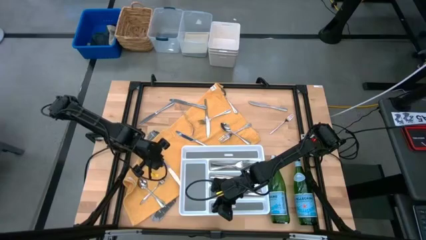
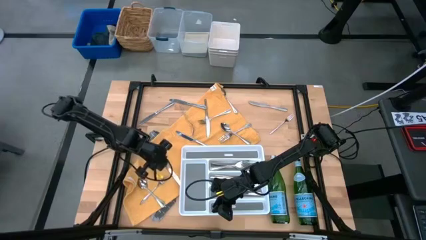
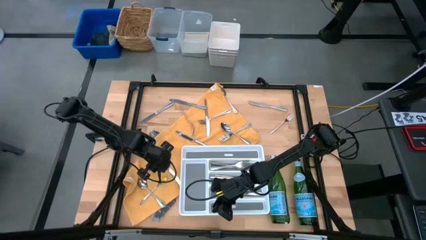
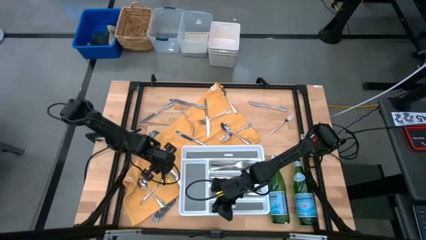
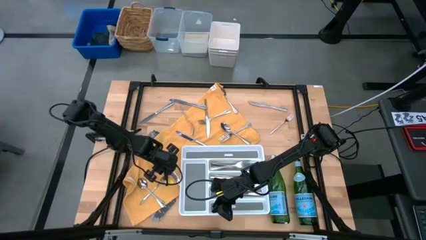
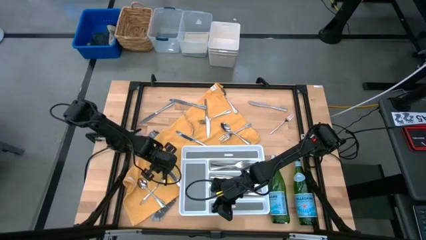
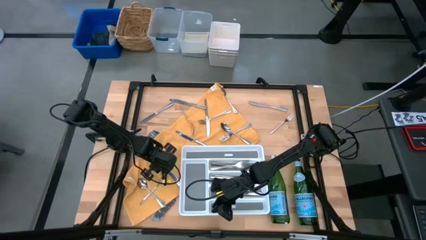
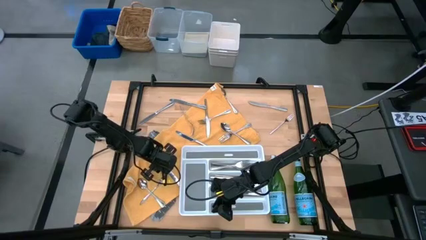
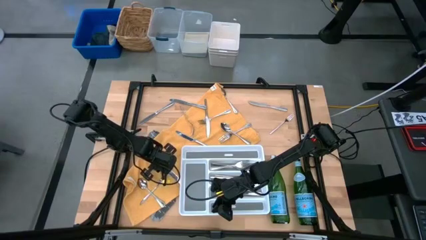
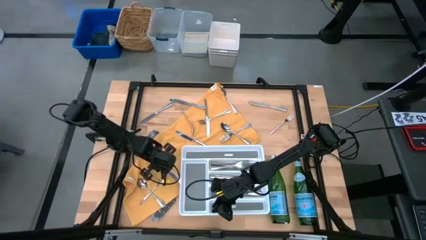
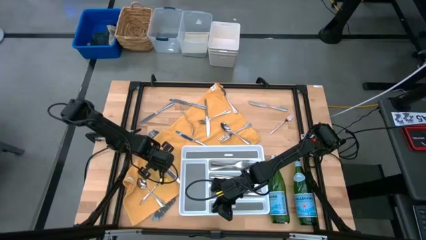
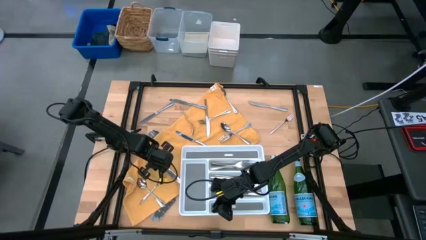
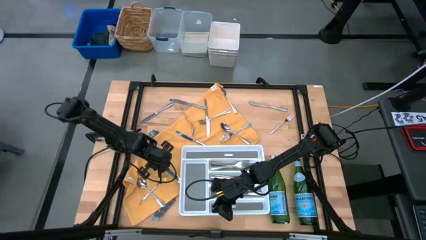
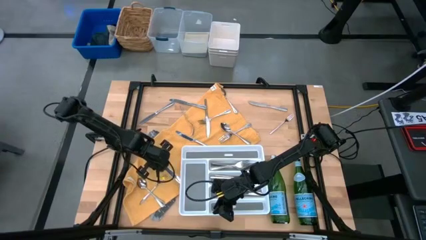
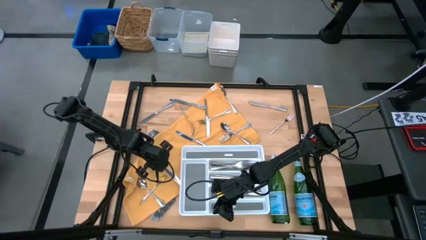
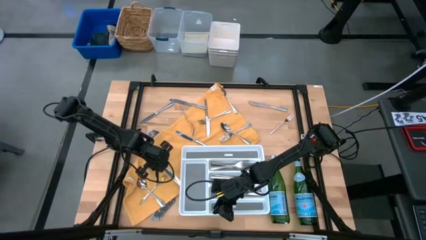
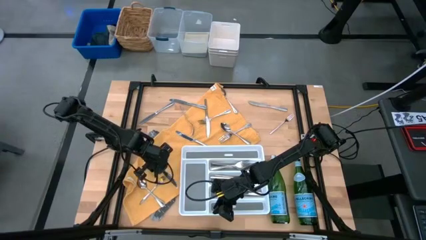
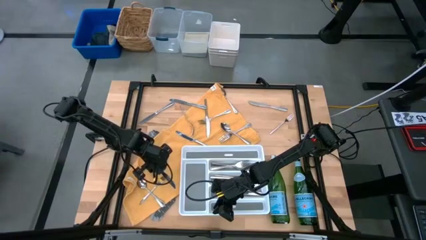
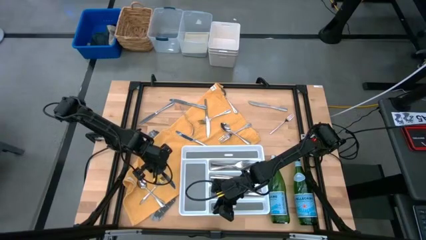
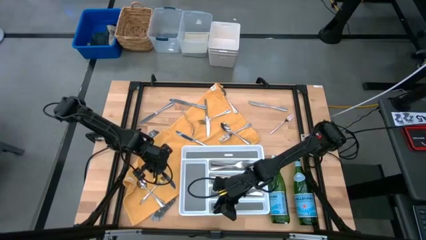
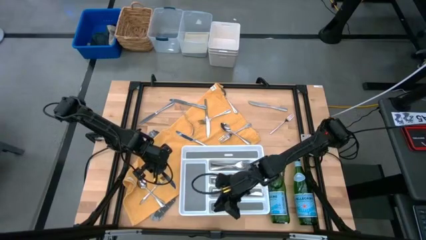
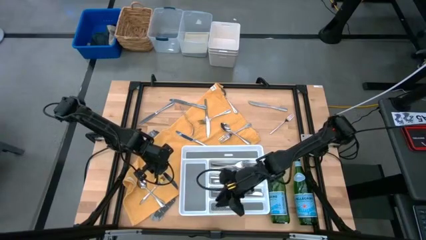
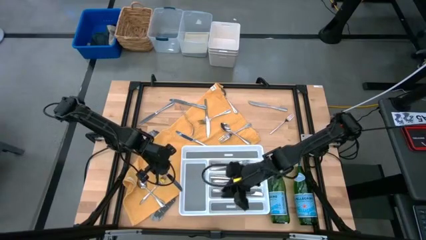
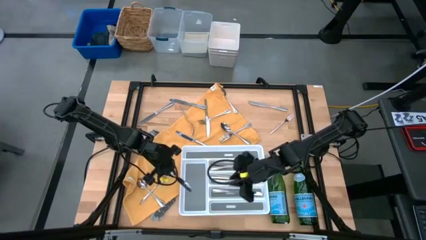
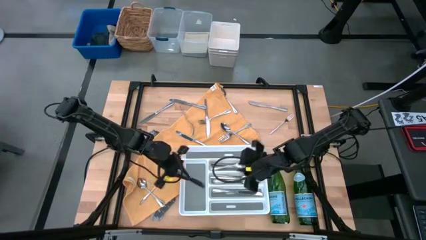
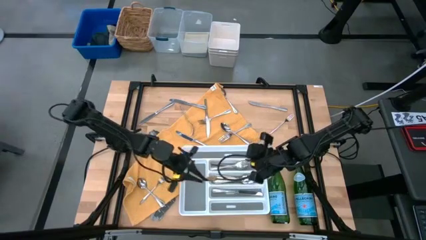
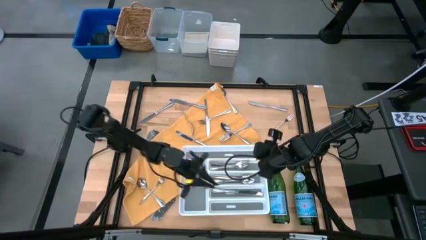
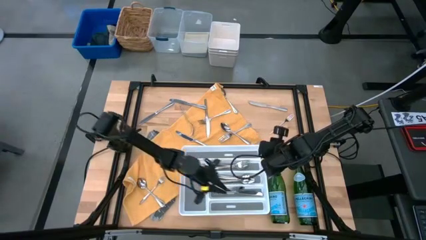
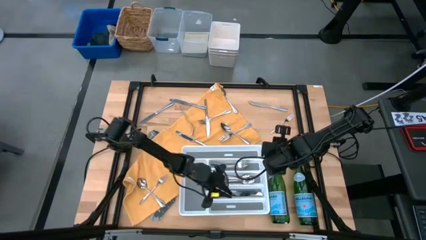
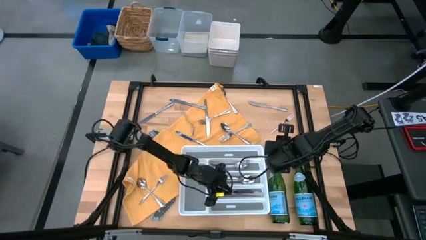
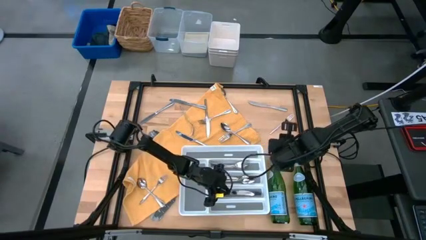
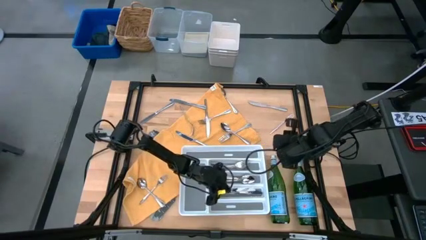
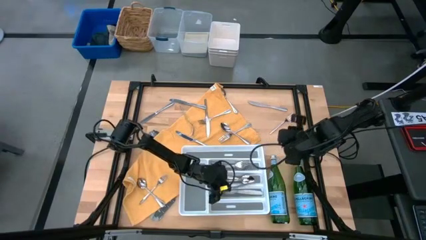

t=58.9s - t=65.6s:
Task: Sort silverware
Put the silver table knife into the white silverware tray

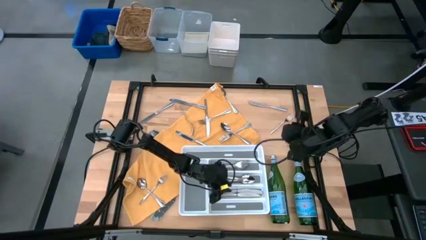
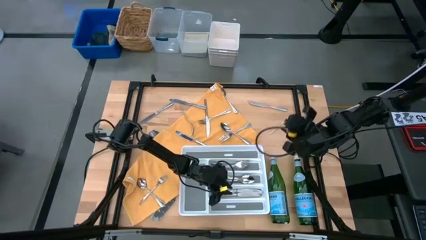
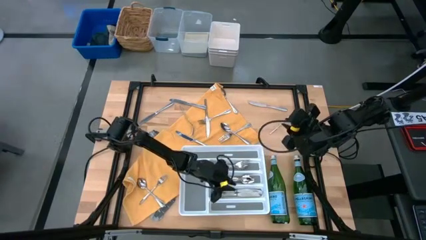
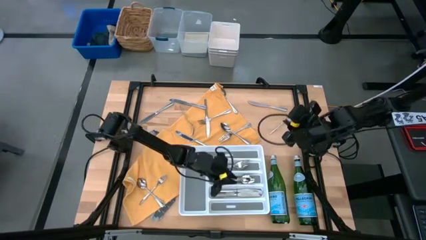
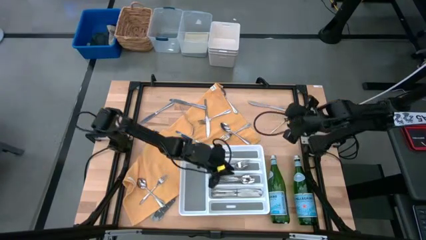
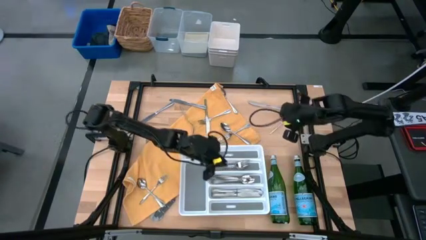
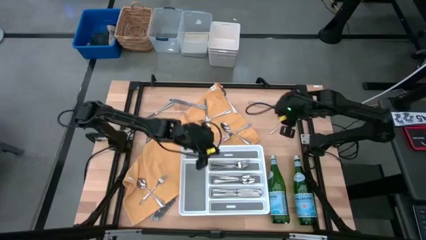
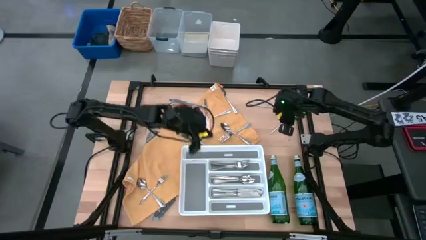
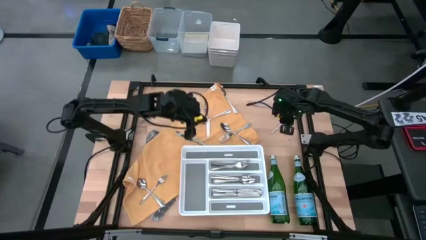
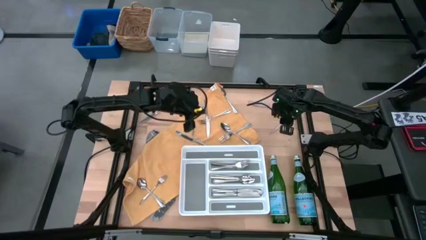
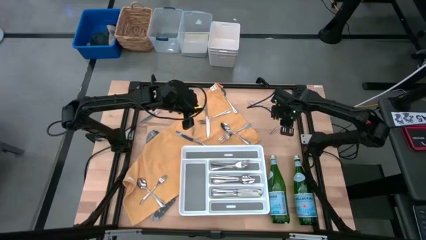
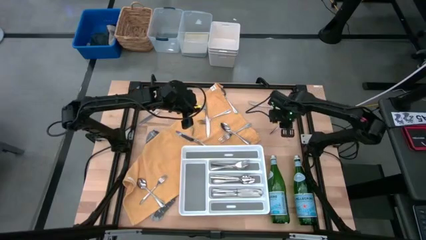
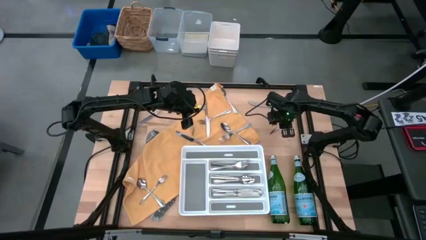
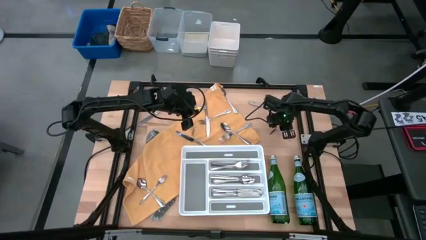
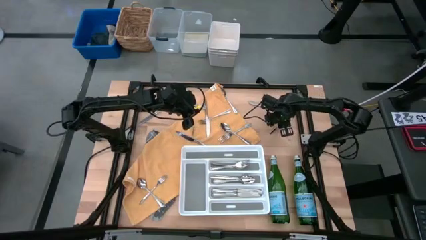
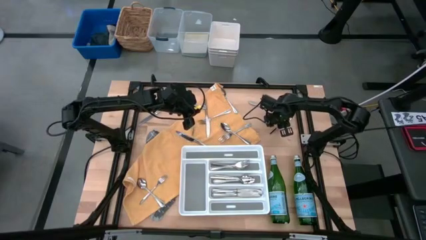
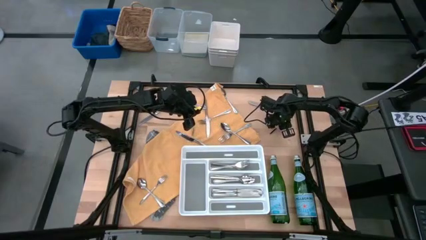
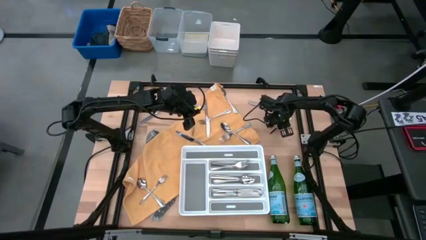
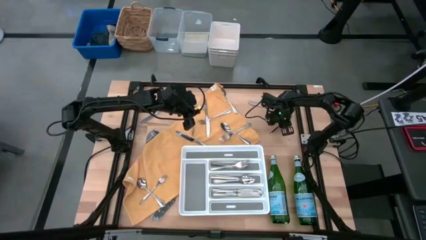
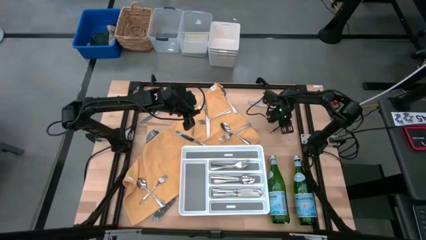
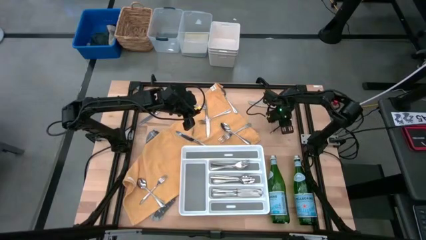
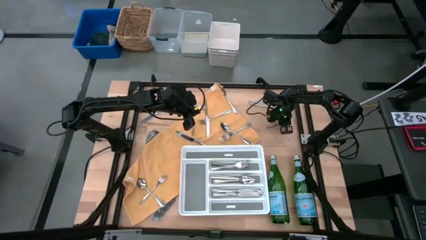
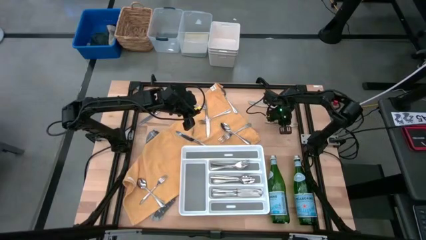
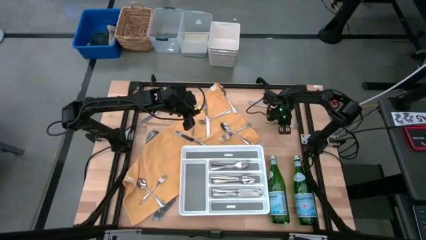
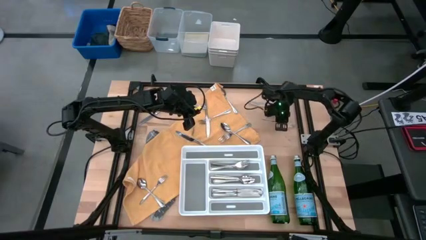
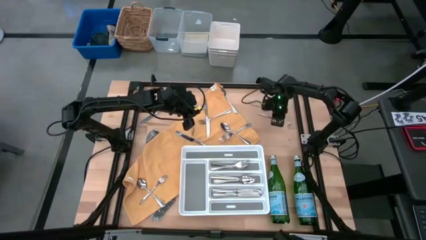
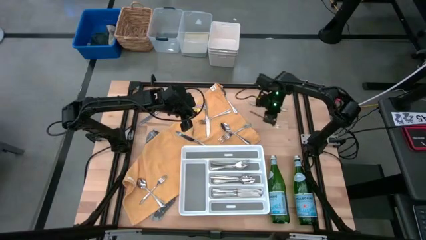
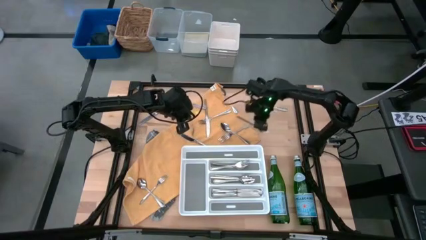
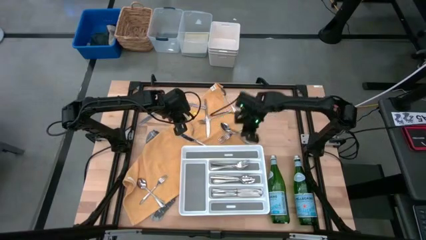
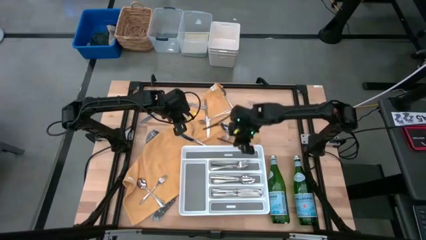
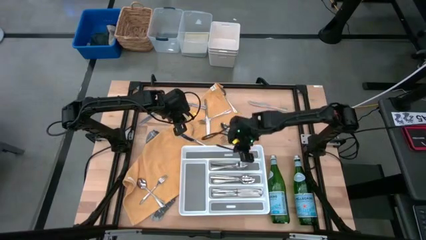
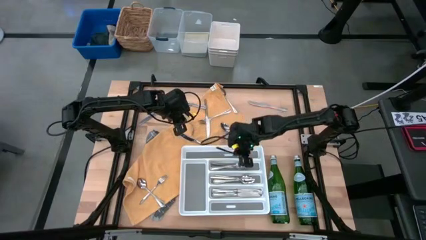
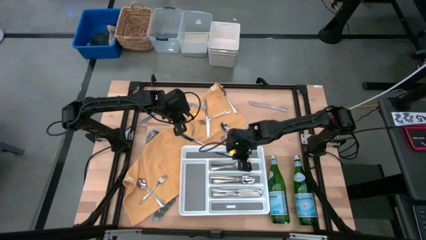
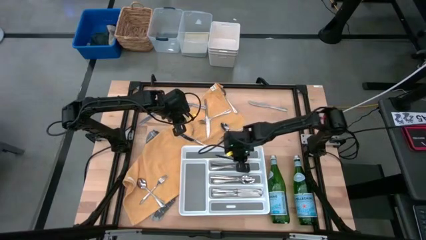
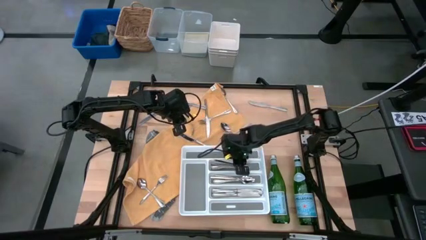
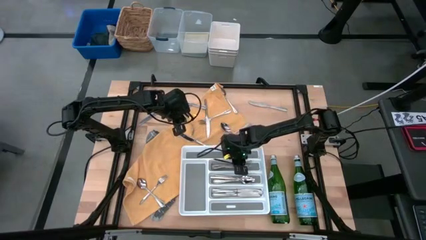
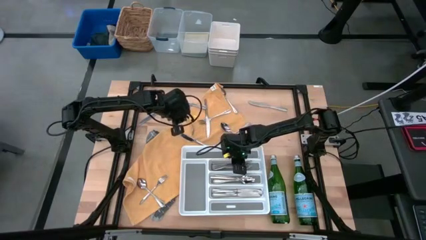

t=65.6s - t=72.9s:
Put the silver fork into the white silverware tray

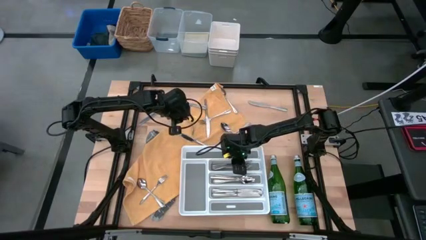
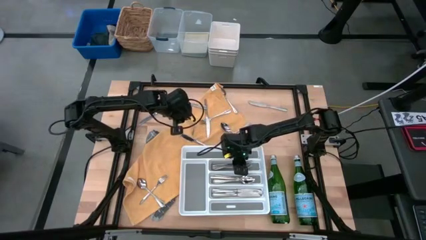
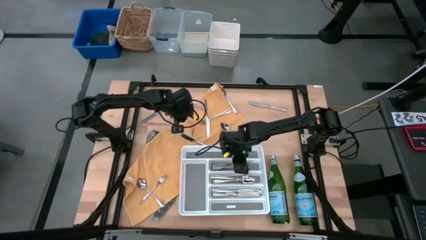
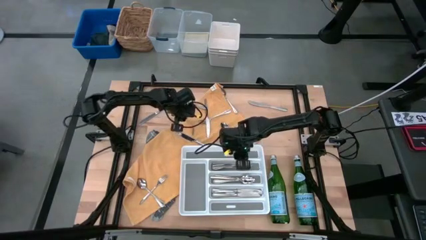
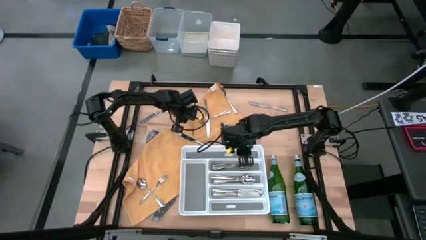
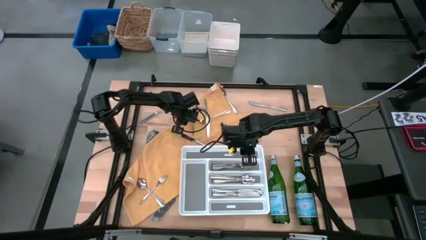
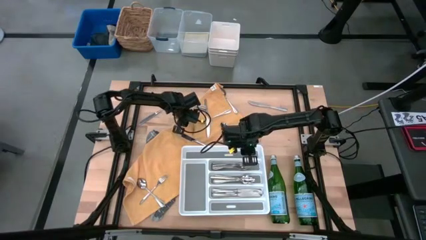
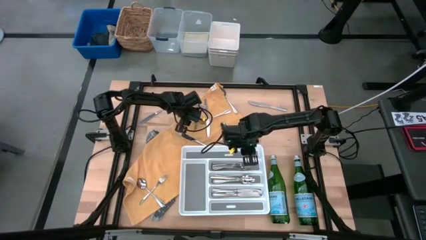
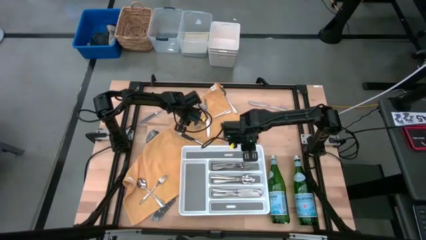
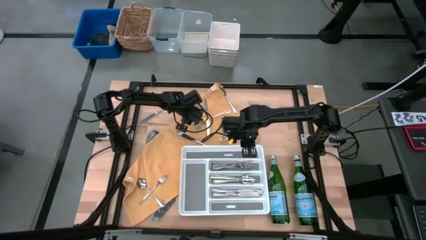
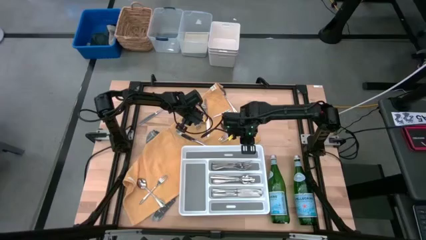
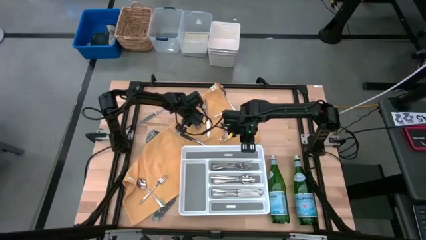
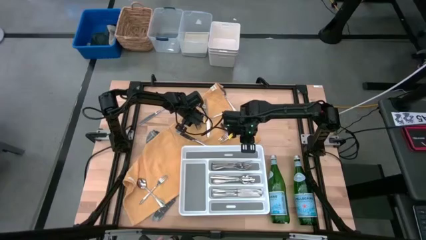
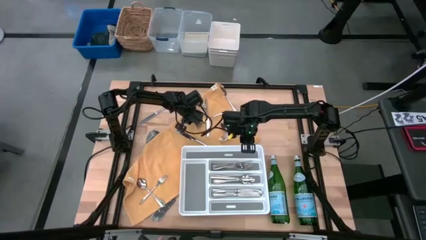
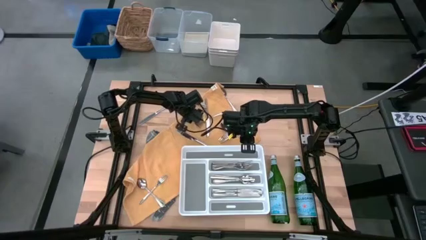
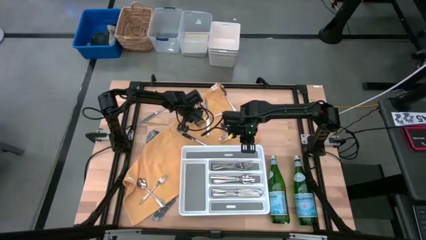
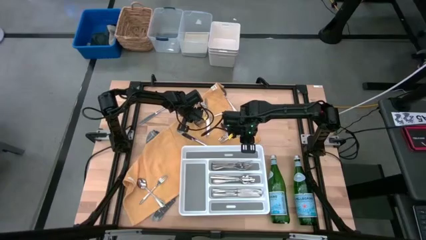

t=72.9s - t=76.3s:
Put the silver fork into the white silverware tray
